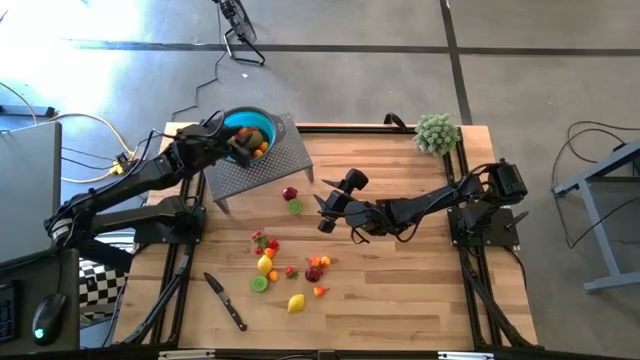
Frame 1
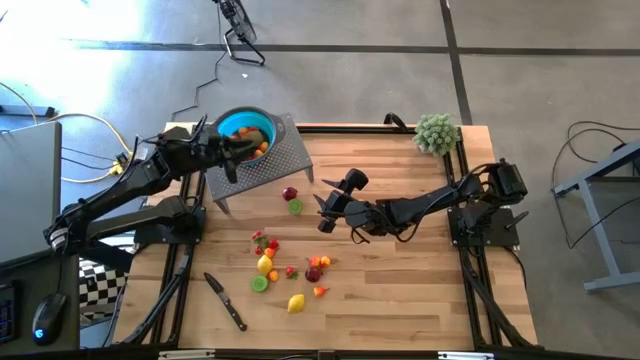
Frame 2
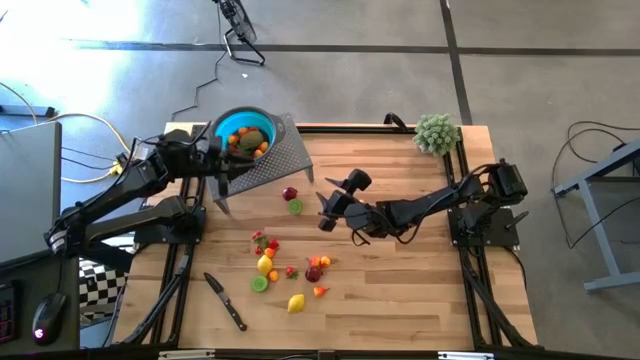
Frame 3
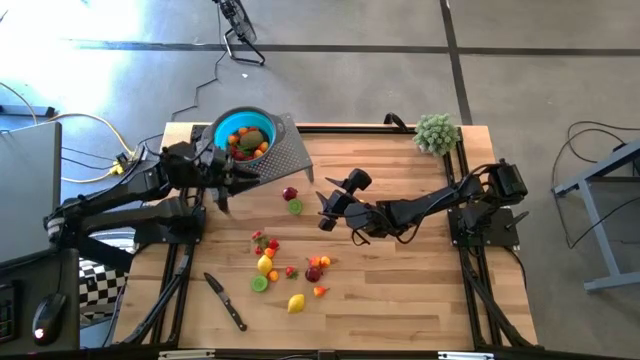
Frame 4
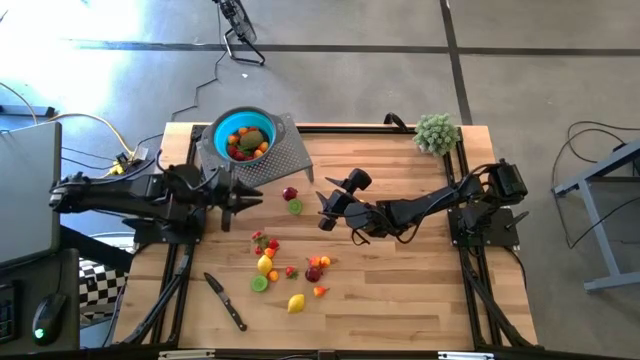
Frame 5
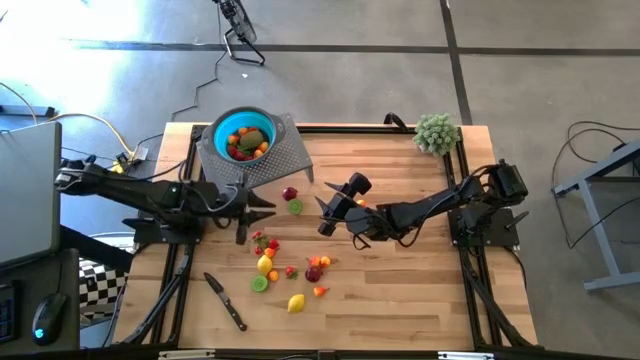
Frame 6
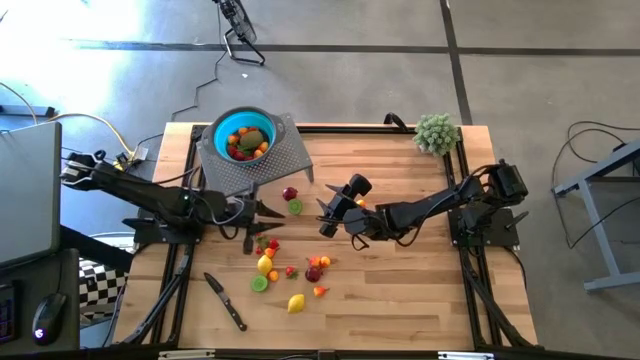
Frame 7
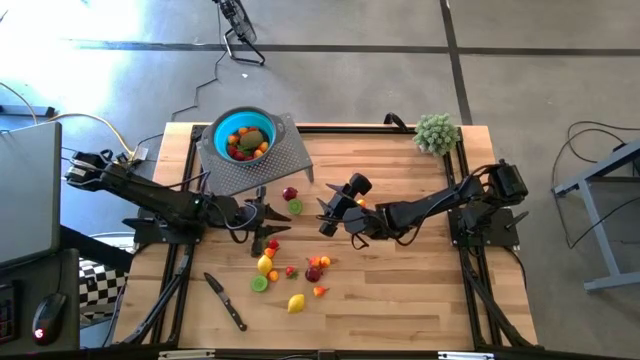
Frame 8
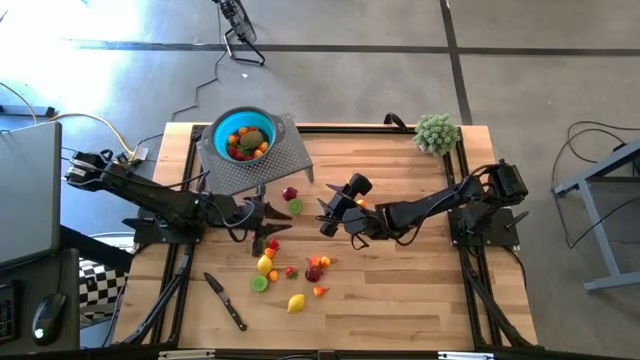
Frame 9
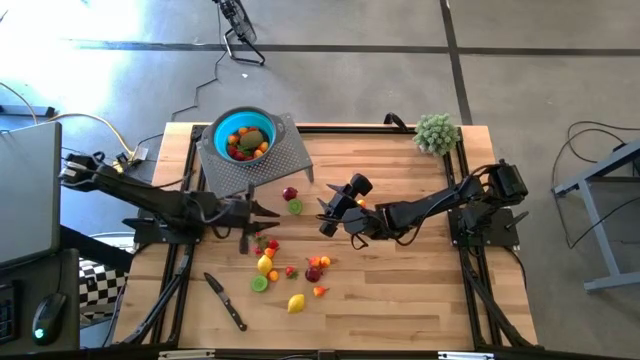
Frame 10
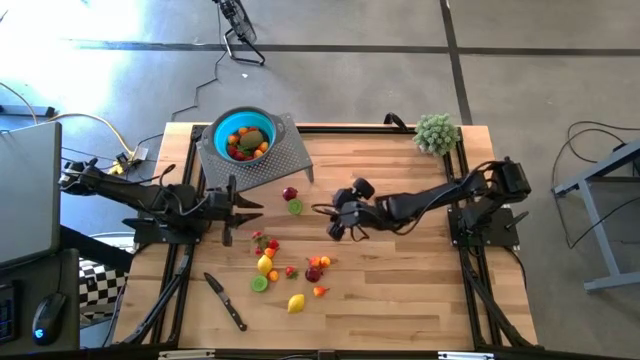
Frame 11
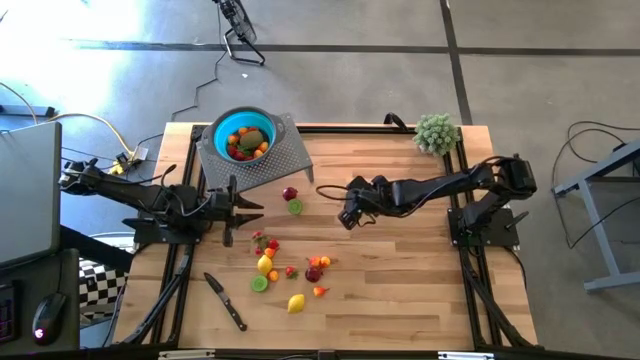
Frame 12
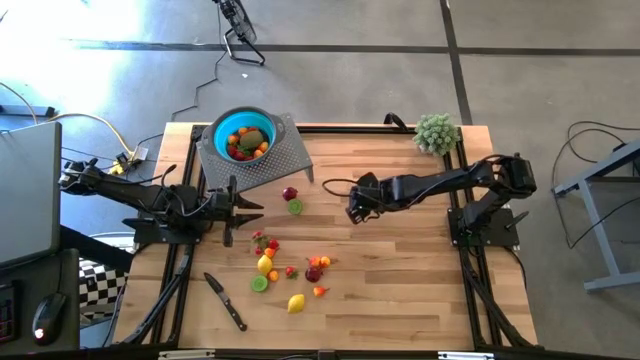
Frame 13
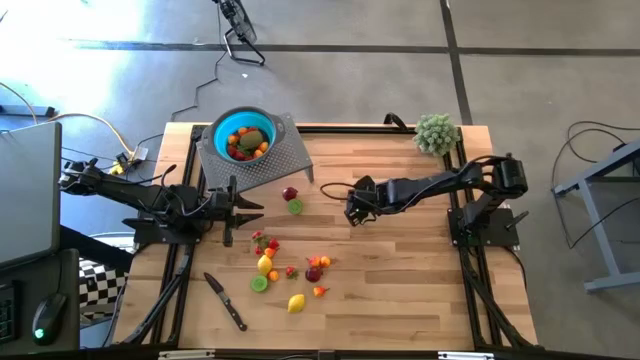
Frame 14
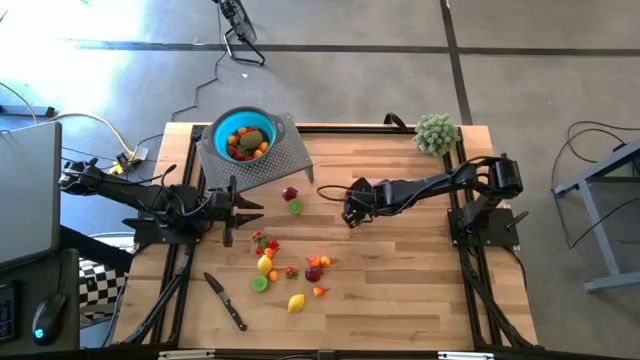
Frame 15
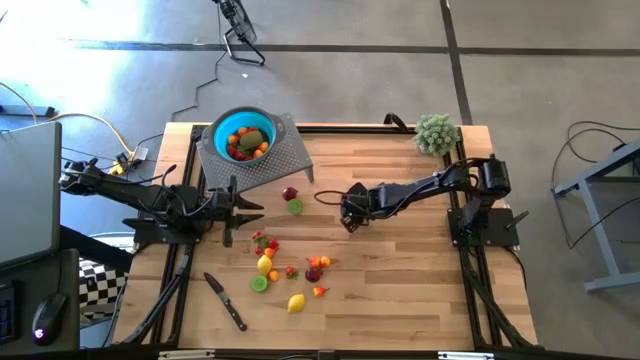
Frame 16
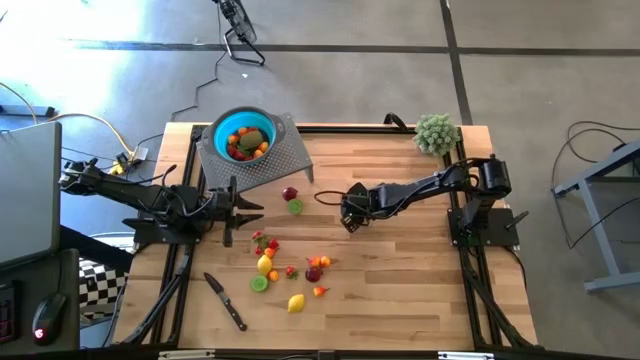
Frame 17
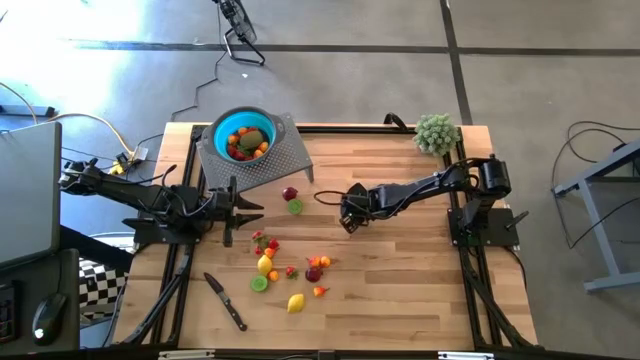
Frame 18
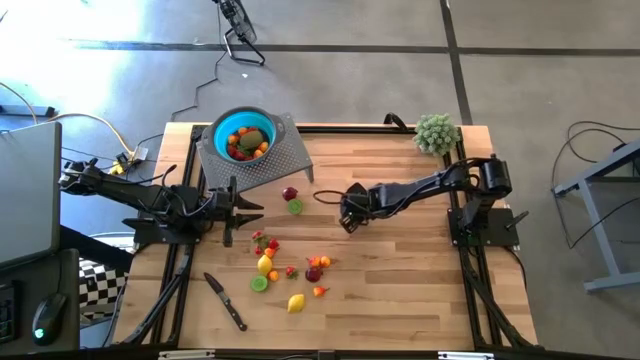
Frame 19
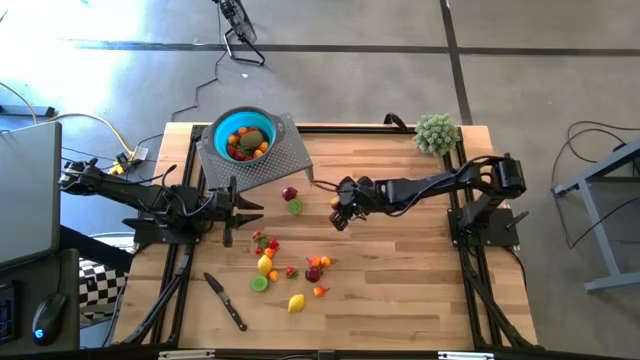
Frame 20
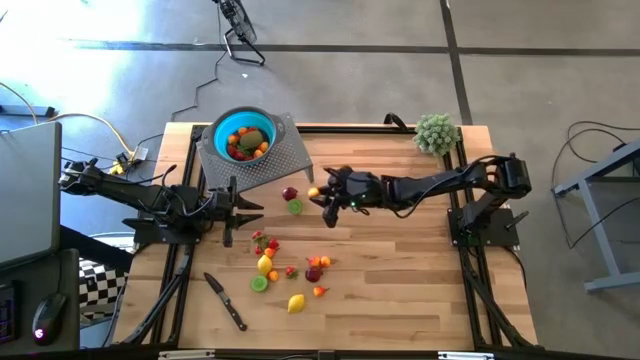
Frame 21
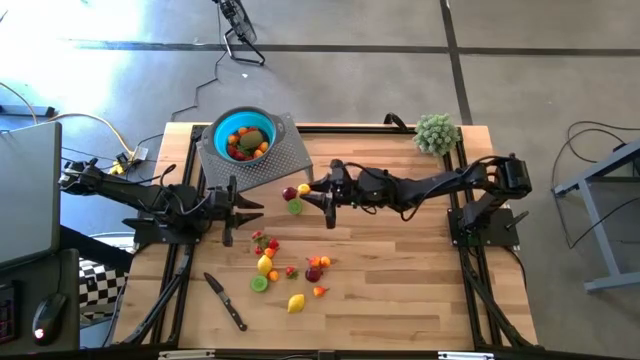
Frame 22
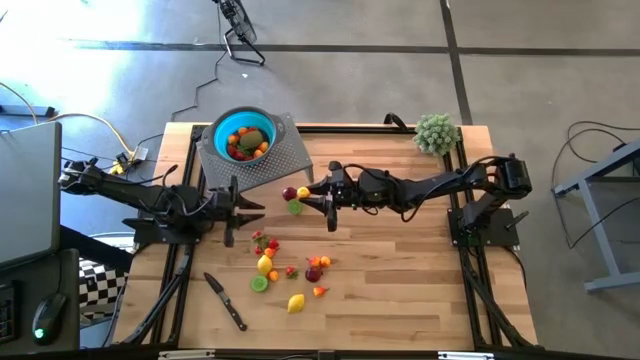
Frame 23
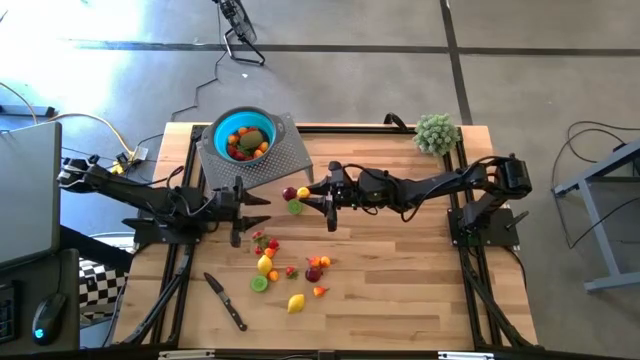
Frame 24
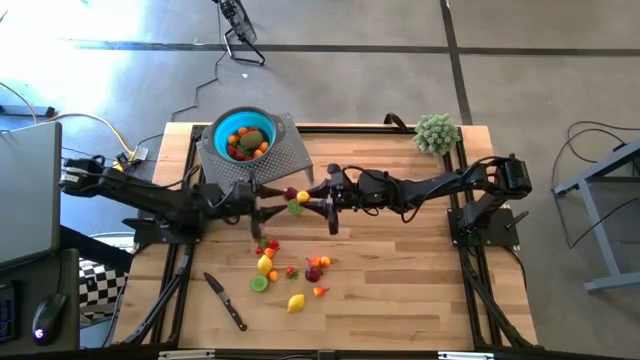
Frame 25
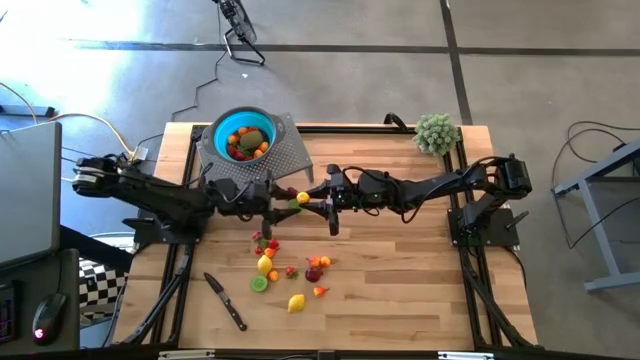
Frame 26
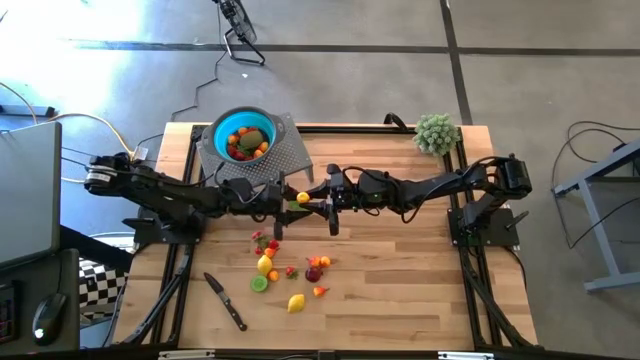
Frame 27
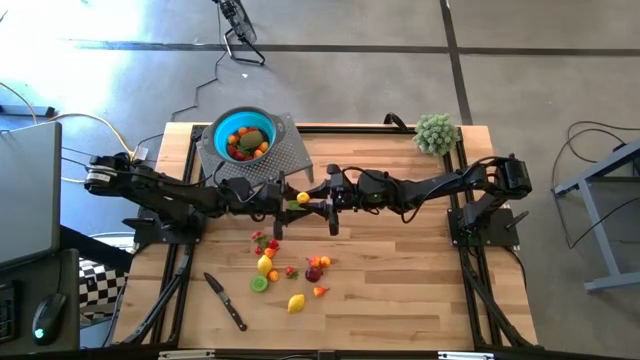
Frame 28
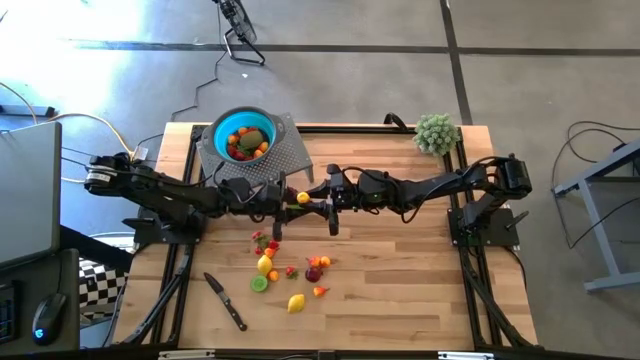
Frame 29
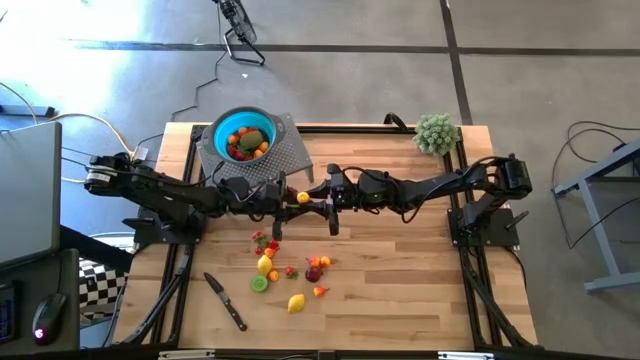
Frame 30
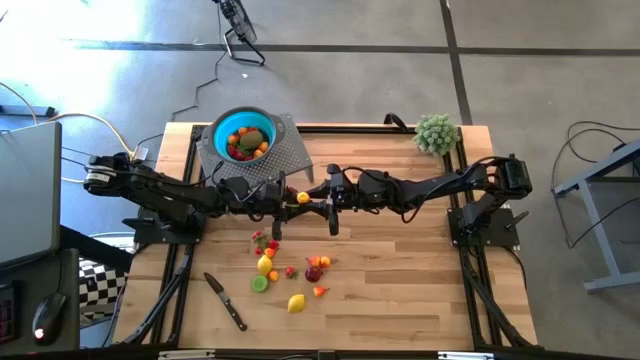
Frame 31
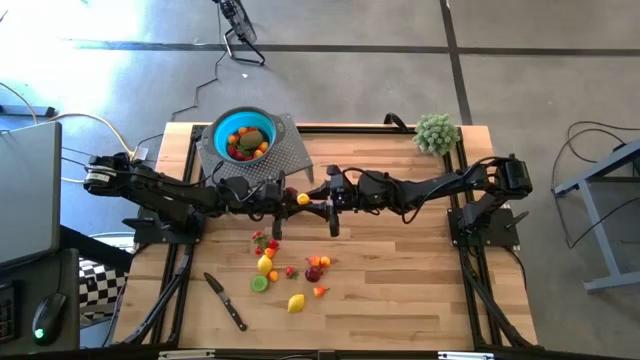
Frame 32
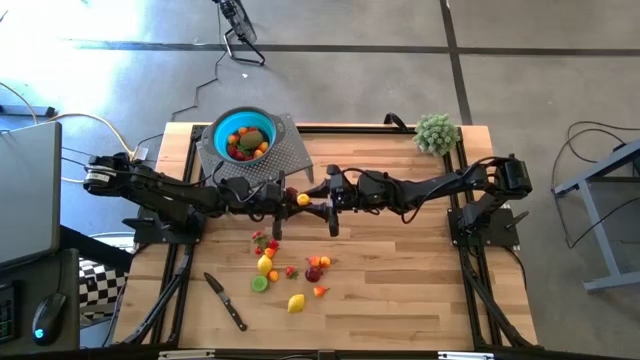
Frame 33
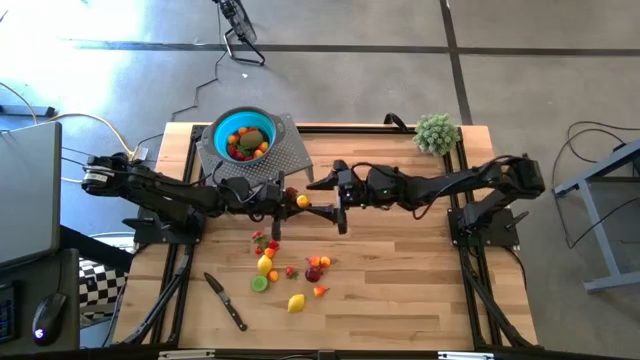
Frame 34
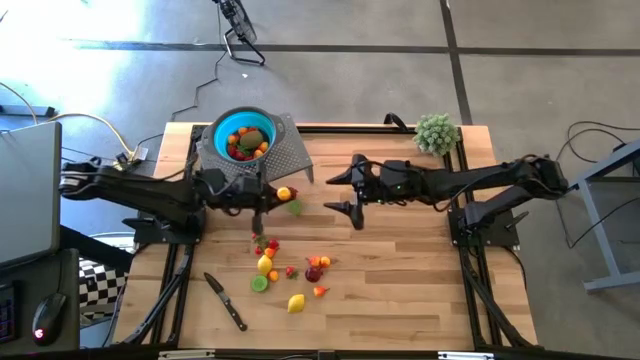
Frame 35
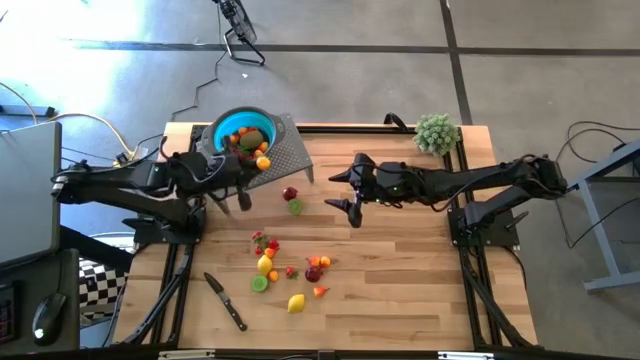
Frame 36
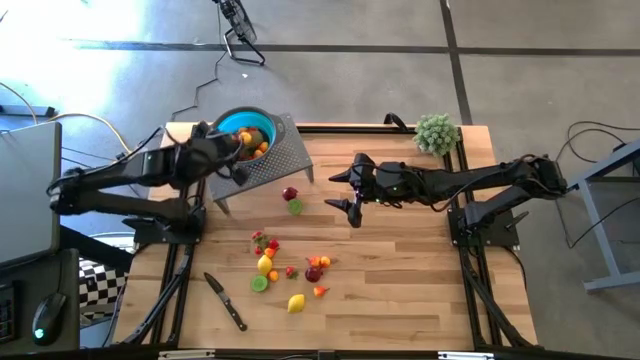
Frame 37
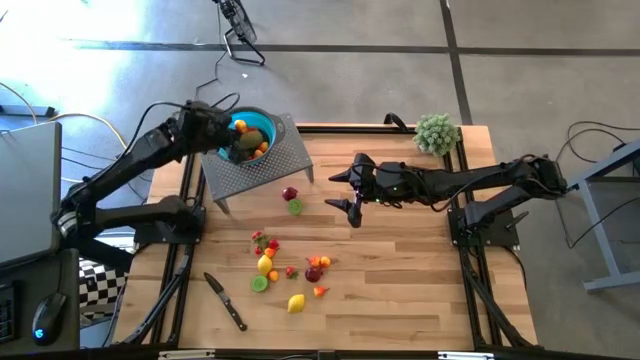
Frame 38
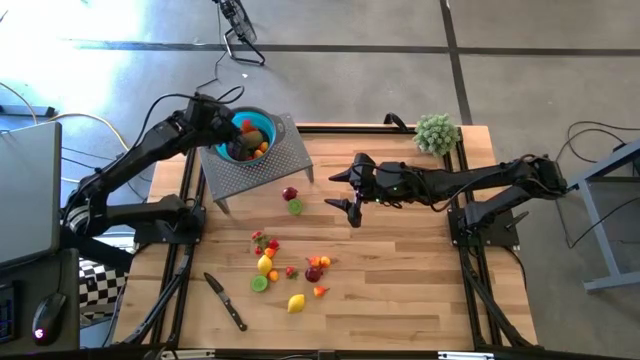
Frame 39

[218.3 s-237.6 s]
Task: Pick & Place Fruit
Put the orange pear into the blue strainer bowl on the shelf

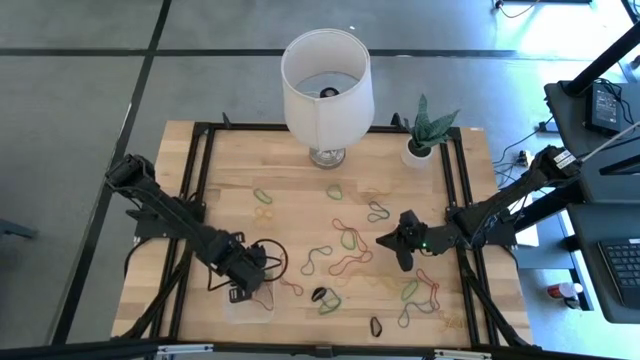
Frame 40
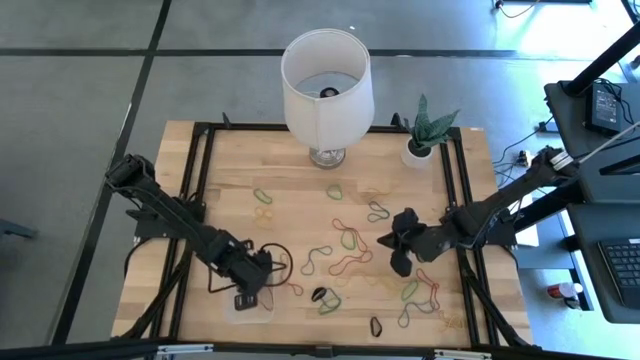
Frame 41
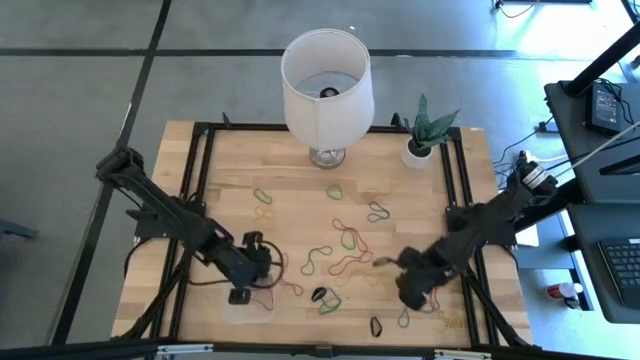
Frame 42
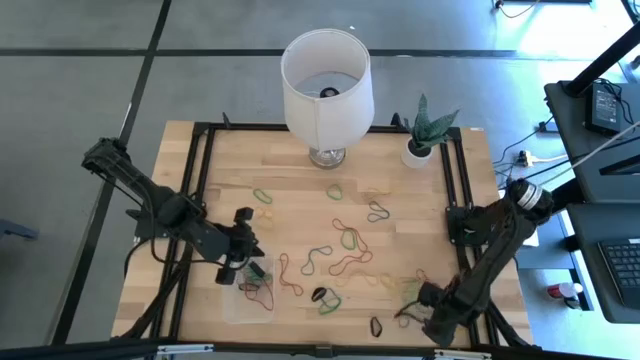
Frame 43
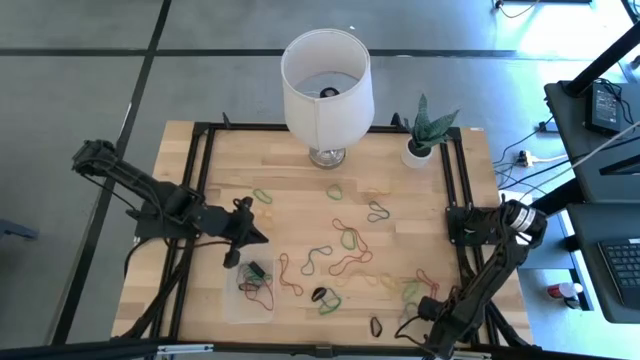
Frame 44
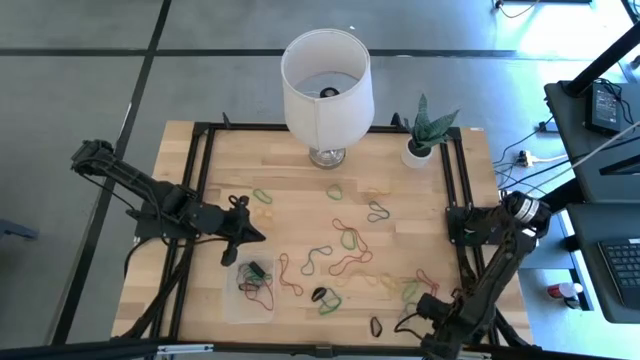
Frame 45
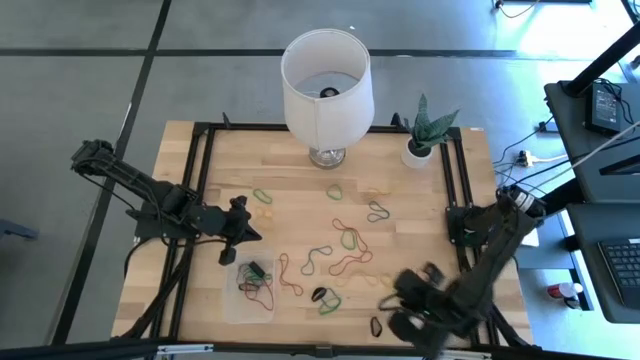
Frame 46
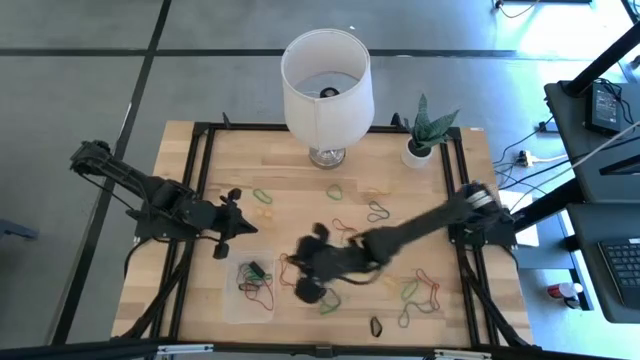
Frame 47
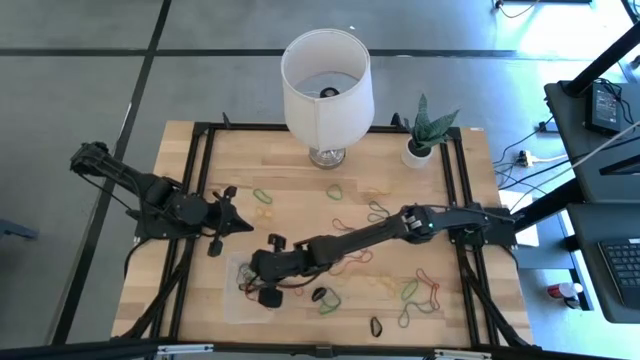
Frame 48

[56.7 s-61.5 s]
Task: Pick and place rubber bands into bin
Put the yellow rubber band into the transparent bin
